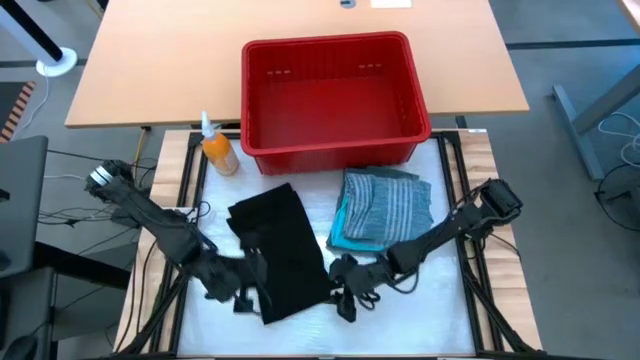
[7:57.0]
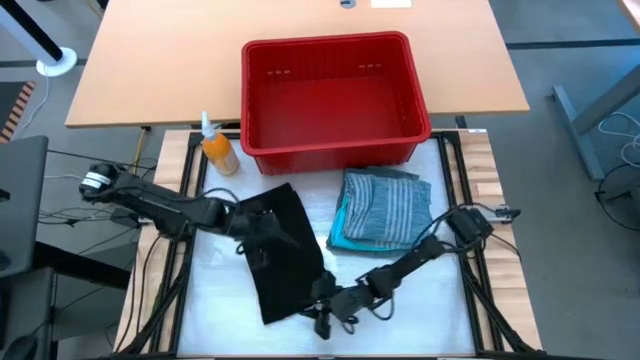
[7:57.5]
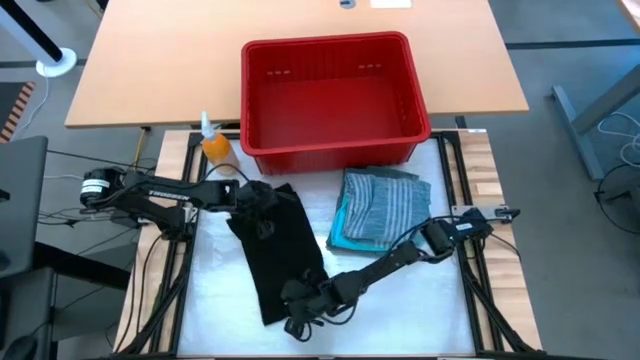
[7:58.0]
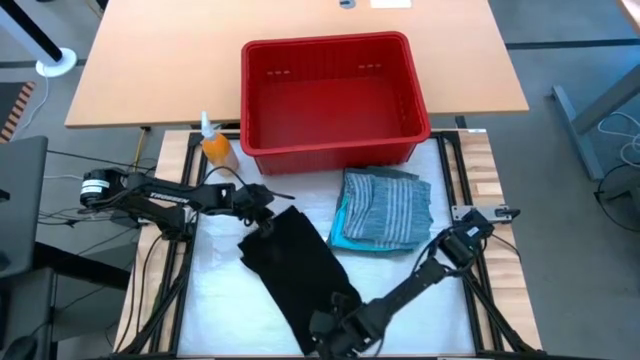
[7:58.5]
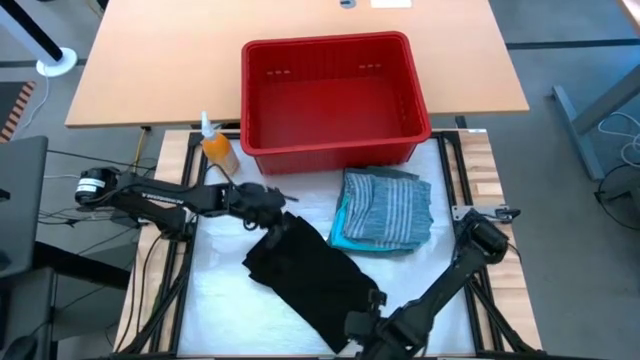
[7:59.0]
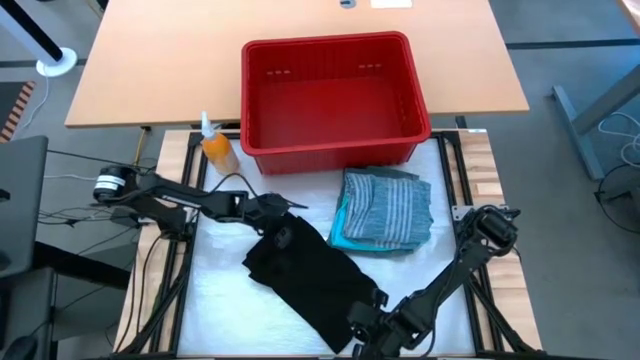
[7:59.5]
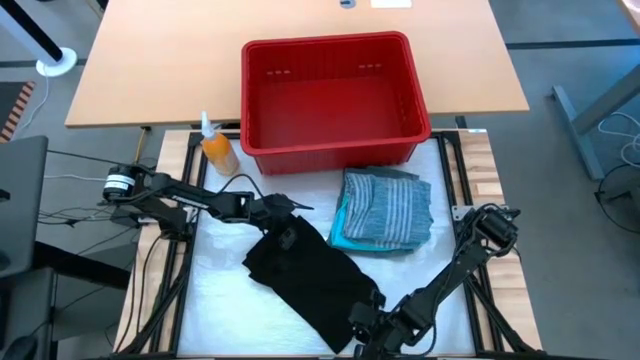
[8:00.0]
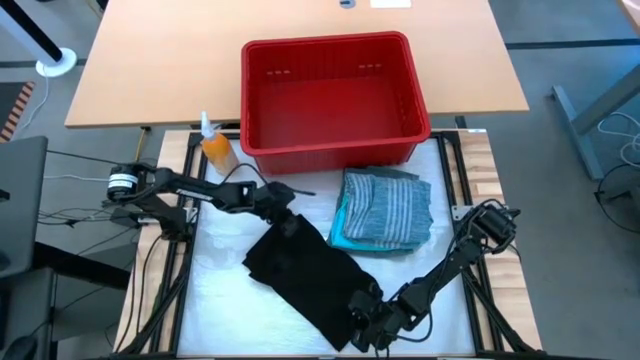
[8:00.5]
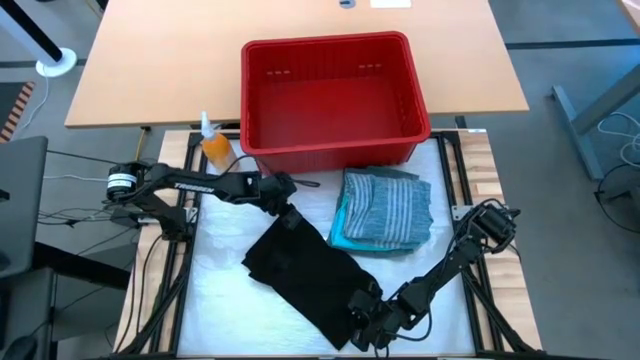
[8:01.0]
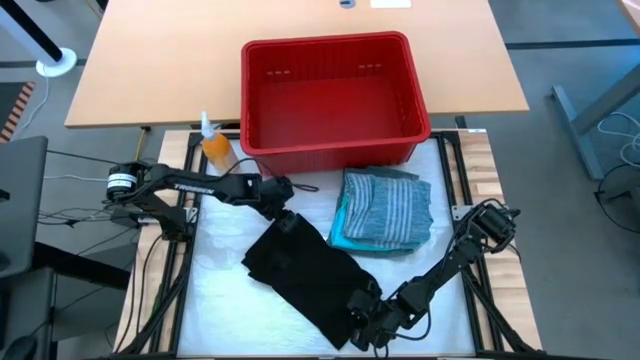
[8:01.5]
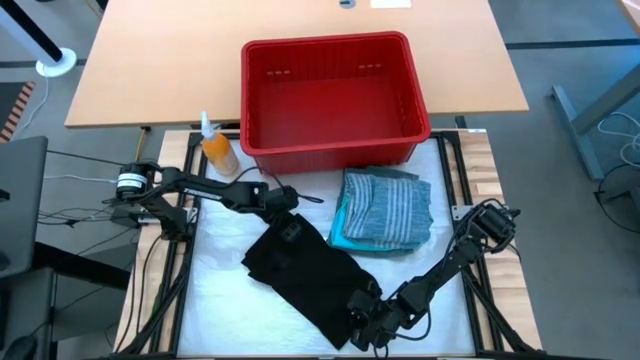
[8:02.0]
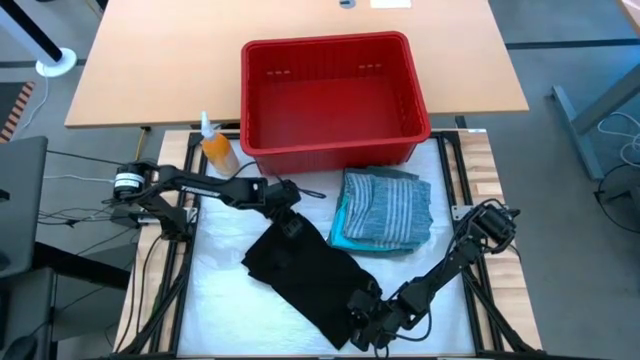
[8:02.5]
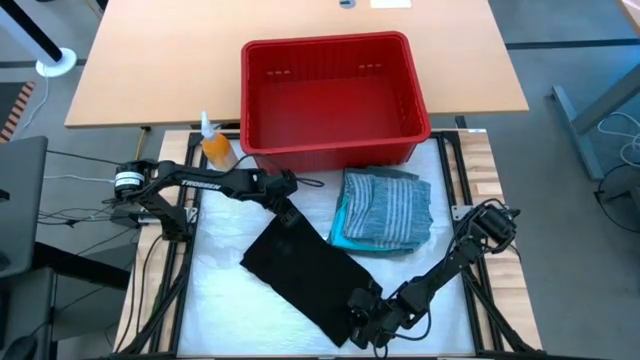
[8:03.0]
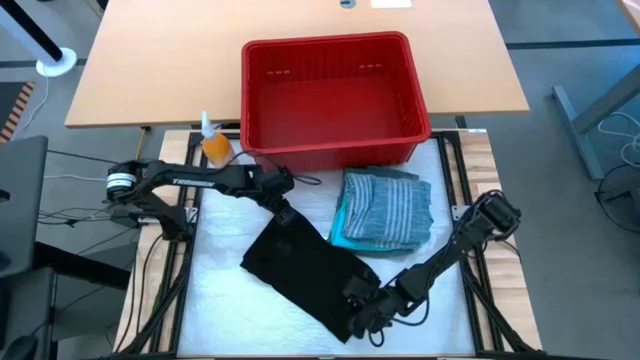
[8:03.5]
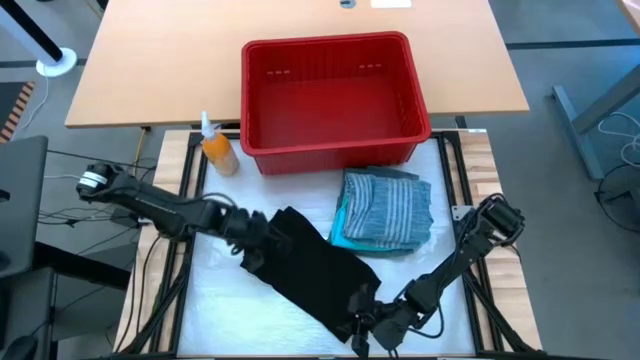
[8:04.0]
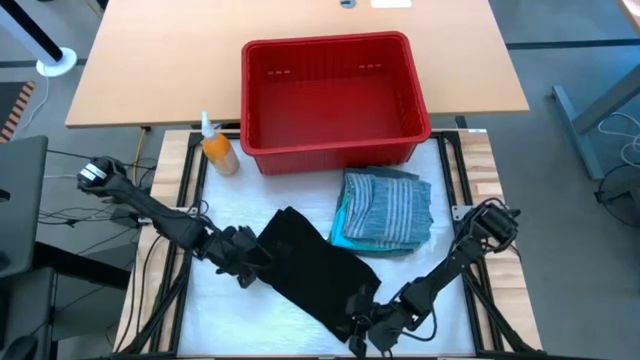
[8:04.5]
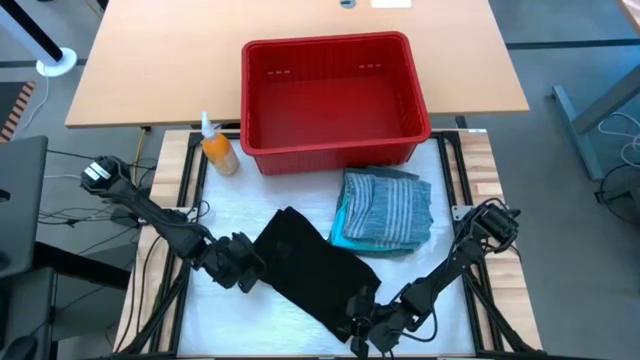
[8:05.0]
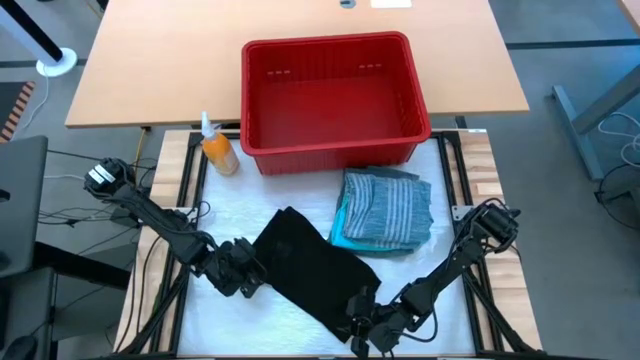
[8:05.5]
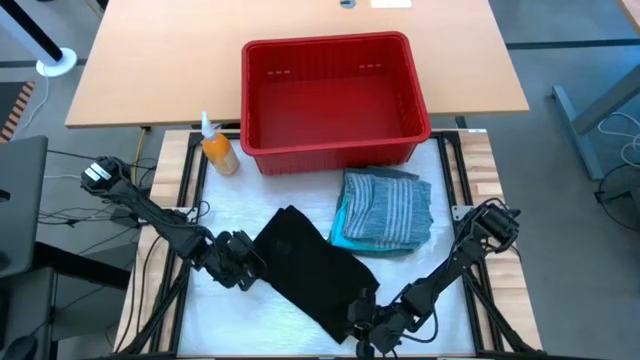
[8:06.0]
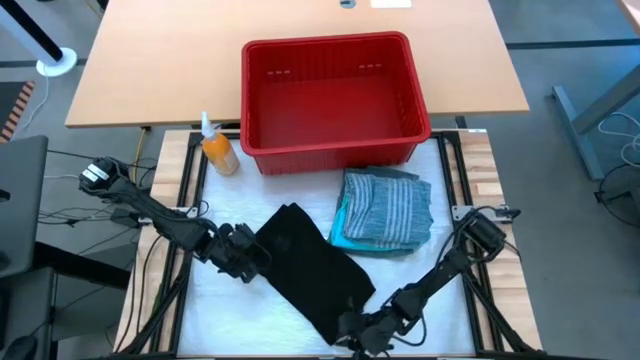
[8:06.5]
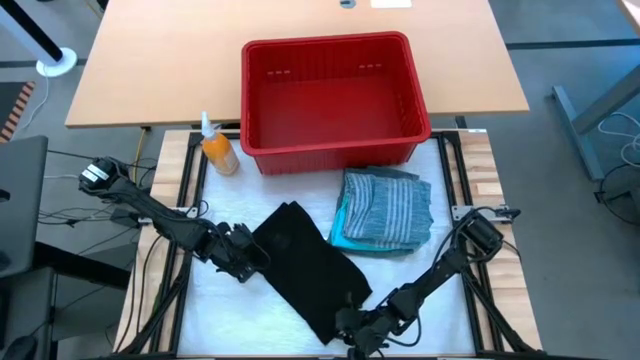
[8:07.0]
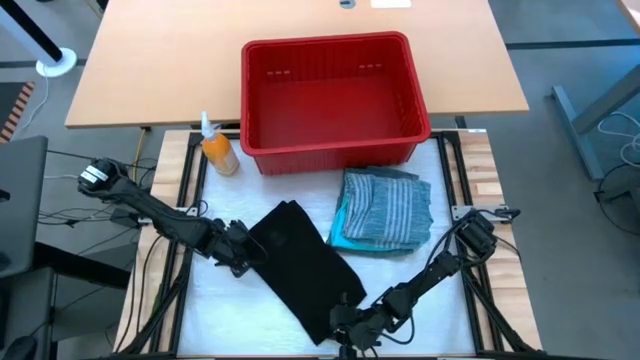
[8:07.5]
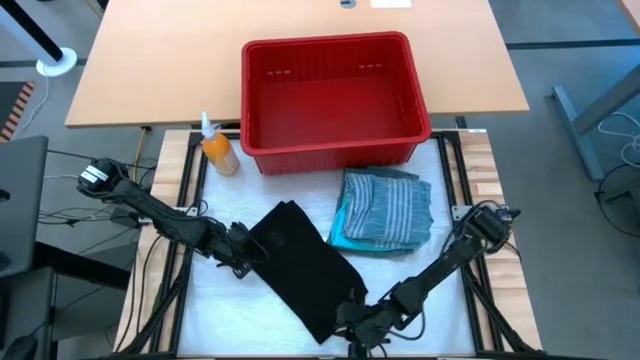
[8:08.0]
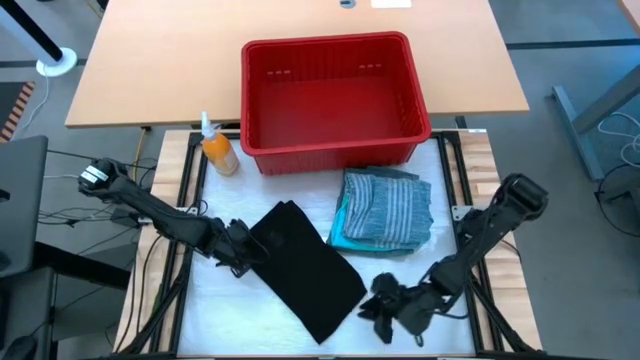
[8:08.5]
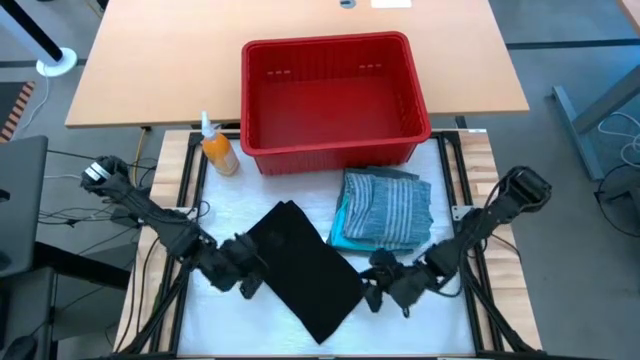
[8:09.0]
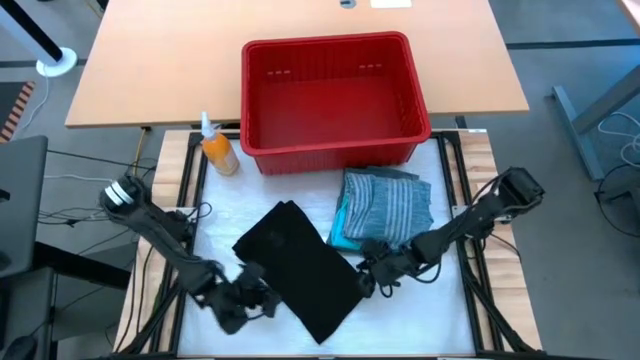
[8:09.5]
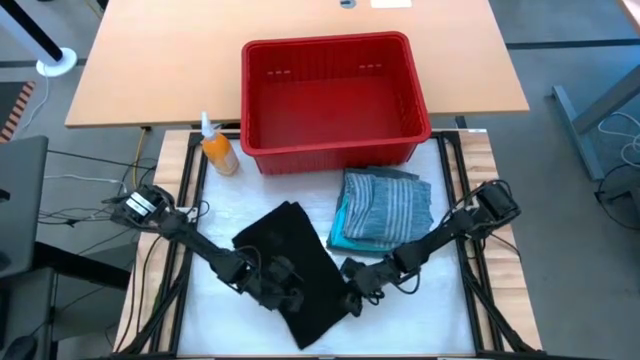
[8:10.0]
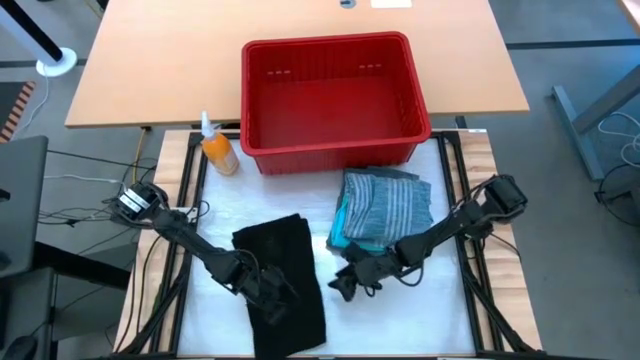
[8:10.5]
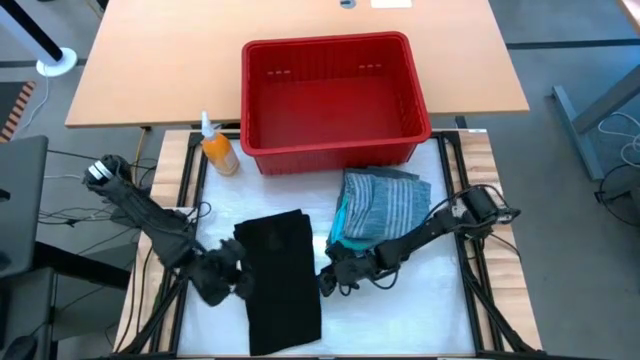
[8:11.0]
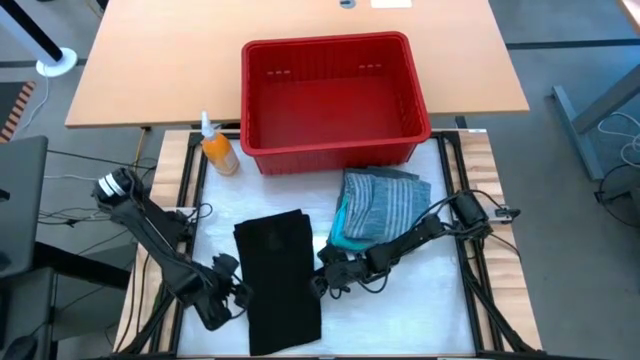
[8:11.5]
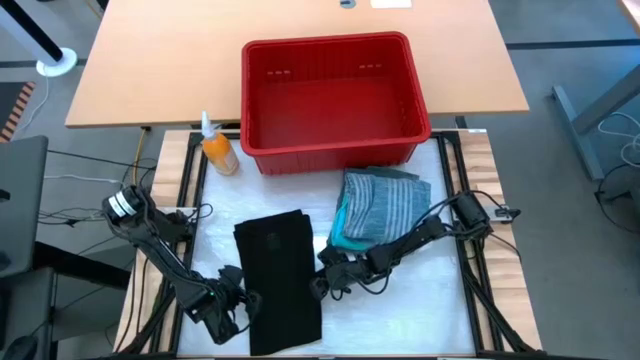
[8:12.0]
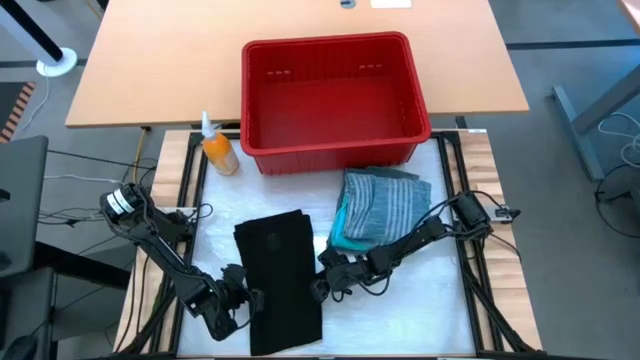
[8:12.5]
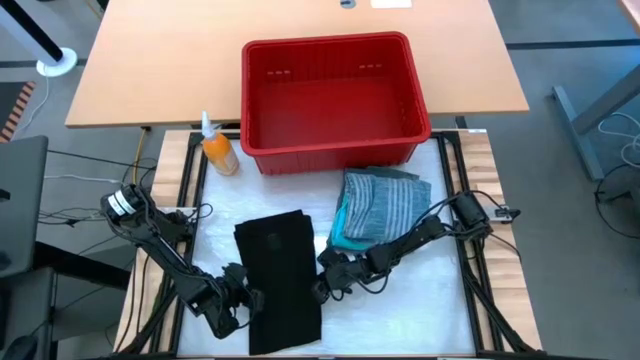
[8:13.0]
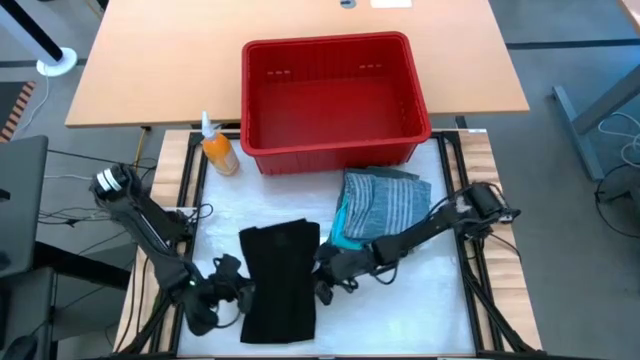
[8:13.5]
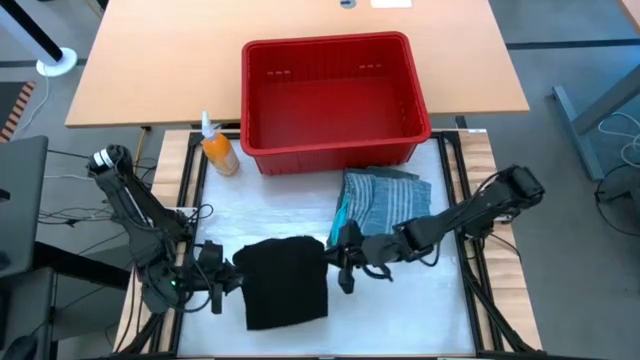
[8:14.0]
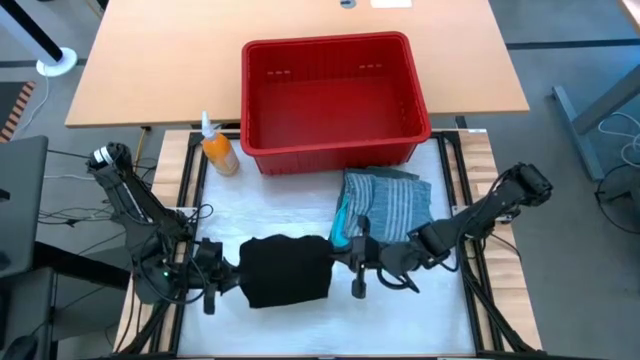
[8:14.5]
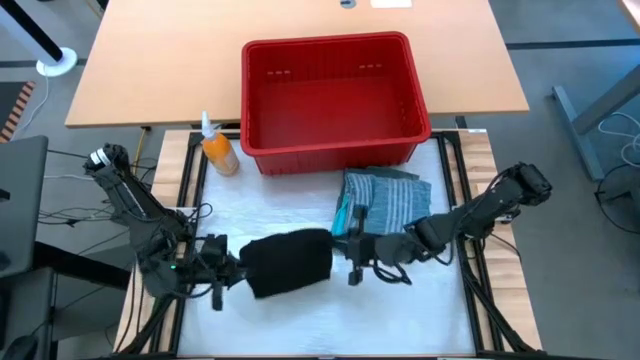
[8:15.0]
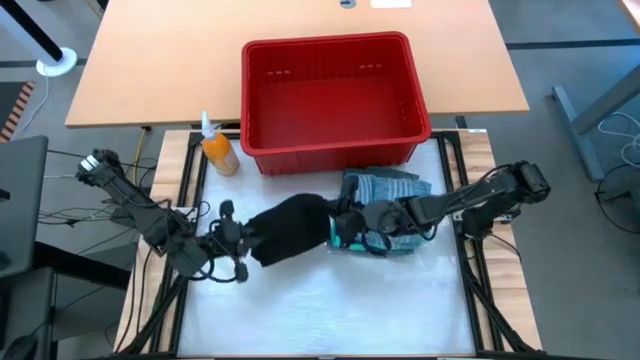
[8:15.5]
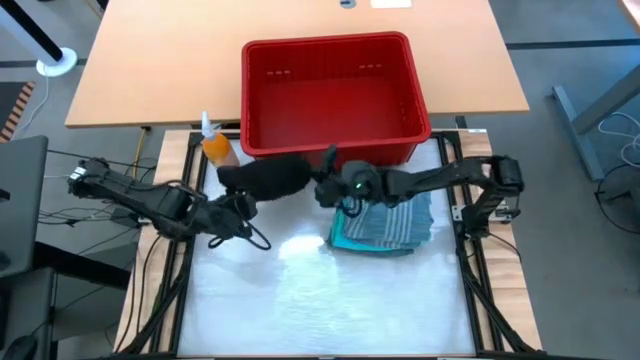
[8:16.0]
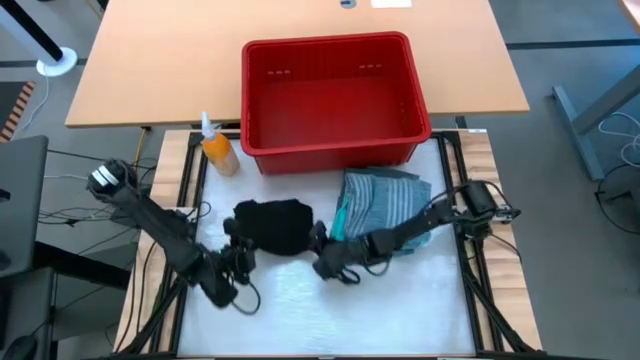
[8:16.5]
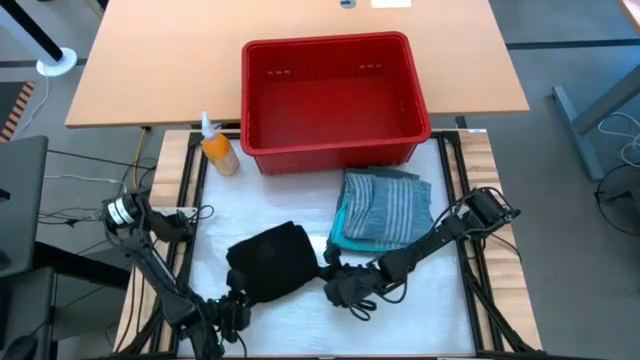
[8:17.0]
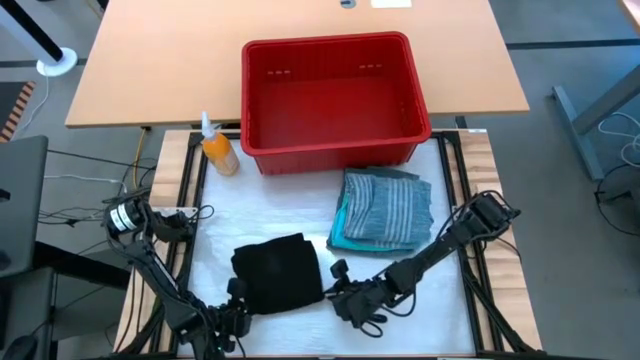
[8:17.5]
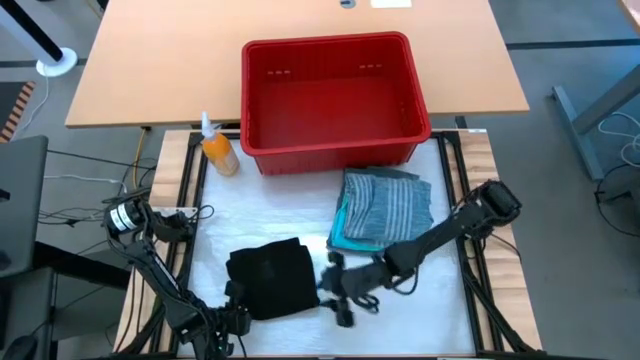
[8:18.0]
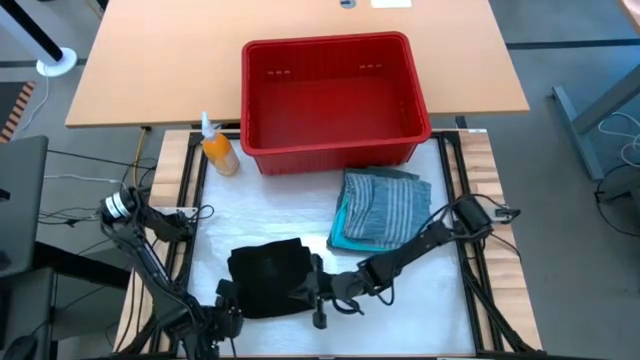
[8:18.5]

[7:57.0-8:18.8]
Task: Fold Laundry from Bin
Fold the black shirt
